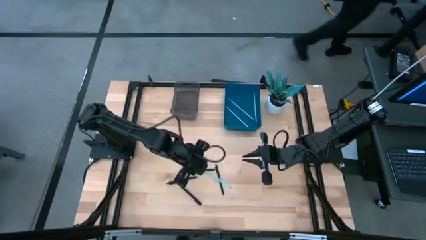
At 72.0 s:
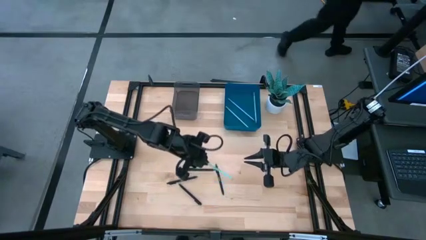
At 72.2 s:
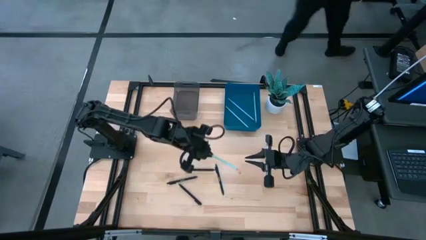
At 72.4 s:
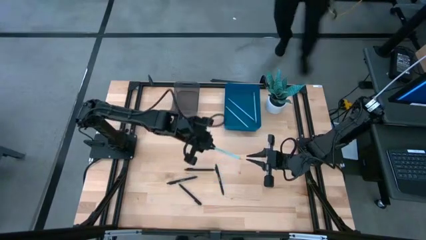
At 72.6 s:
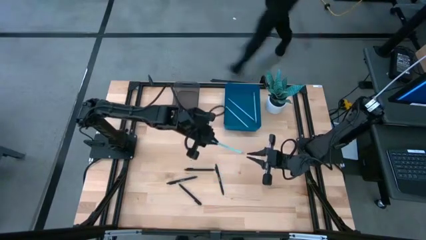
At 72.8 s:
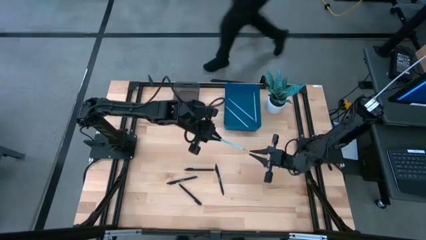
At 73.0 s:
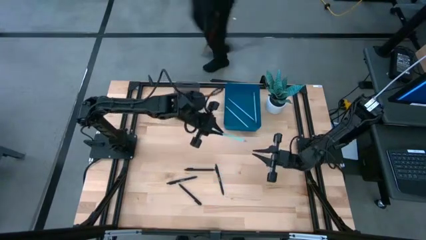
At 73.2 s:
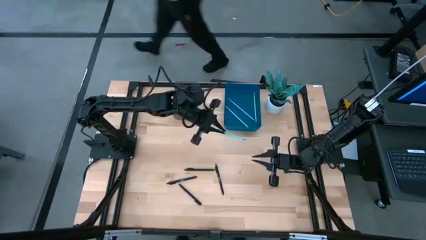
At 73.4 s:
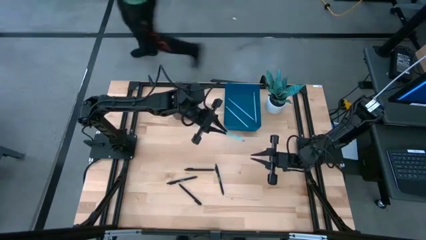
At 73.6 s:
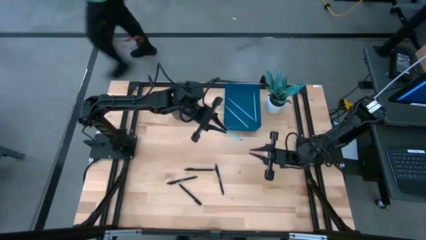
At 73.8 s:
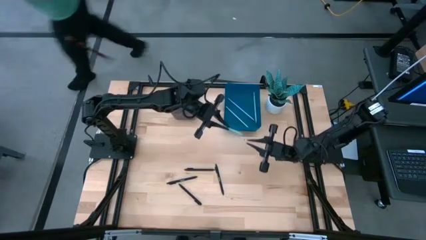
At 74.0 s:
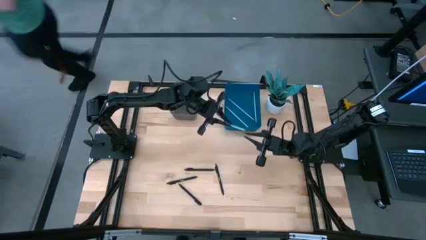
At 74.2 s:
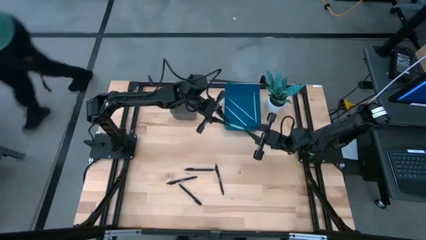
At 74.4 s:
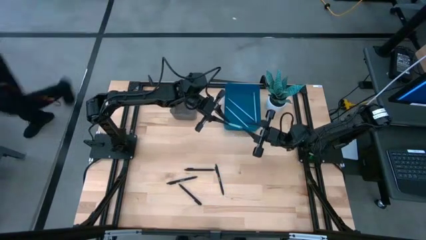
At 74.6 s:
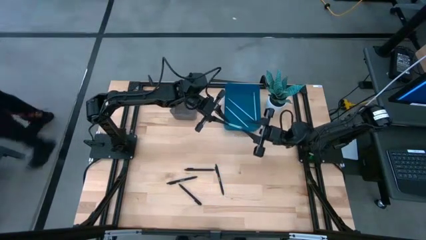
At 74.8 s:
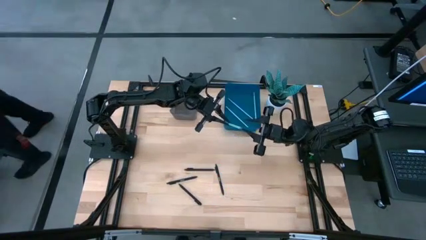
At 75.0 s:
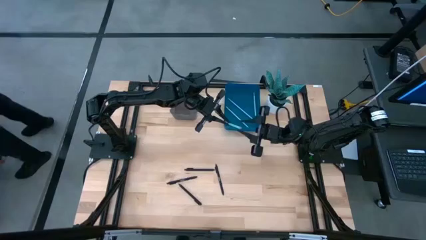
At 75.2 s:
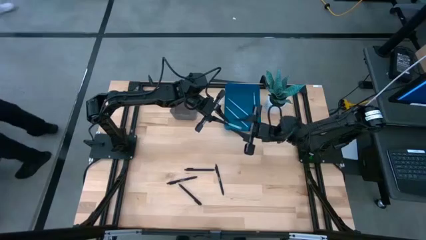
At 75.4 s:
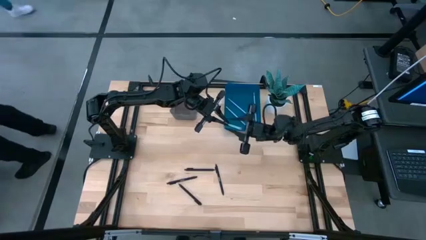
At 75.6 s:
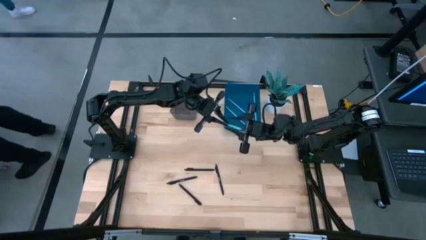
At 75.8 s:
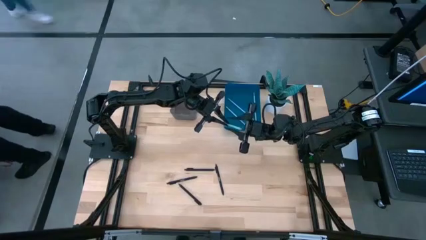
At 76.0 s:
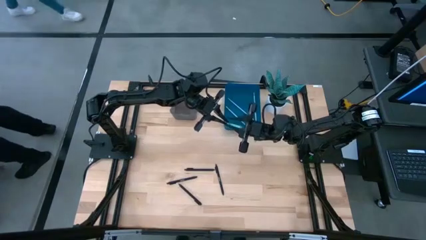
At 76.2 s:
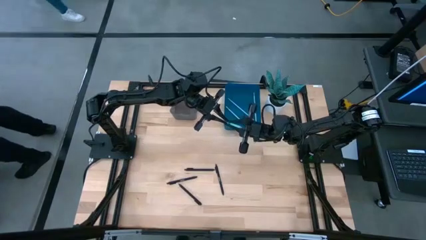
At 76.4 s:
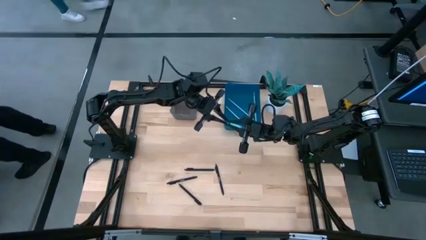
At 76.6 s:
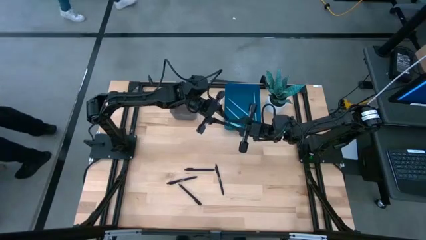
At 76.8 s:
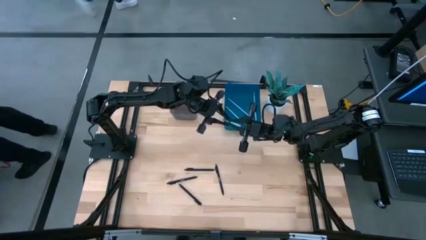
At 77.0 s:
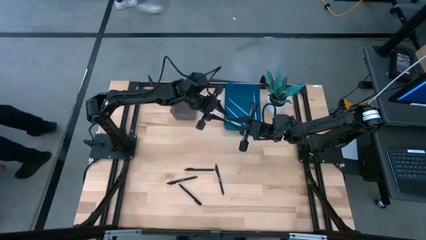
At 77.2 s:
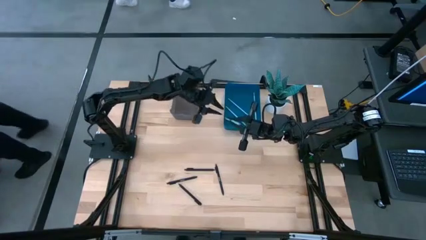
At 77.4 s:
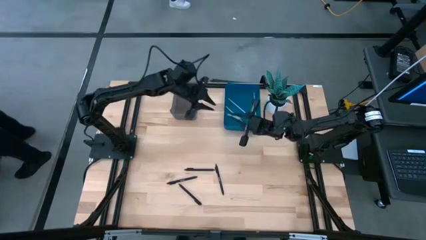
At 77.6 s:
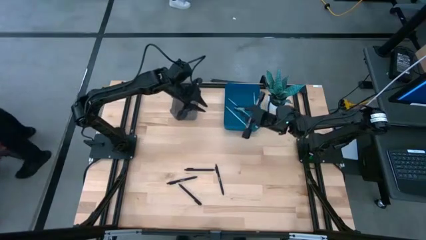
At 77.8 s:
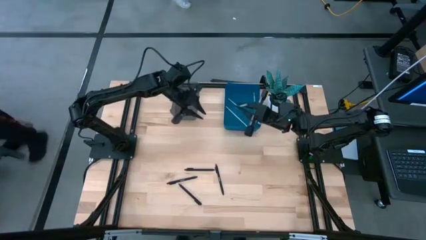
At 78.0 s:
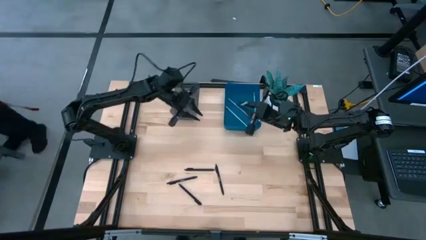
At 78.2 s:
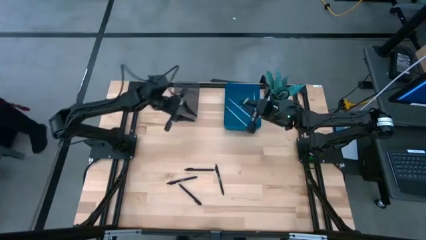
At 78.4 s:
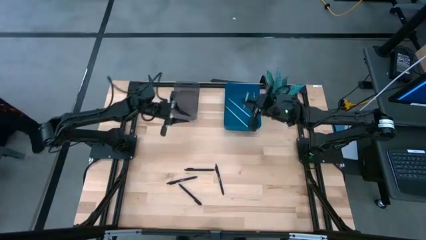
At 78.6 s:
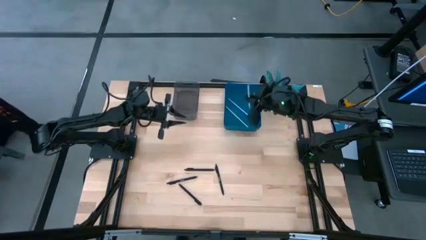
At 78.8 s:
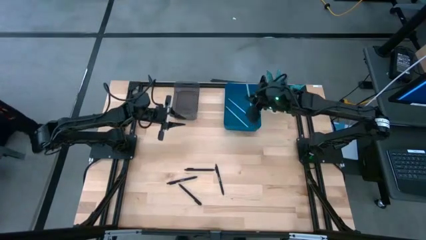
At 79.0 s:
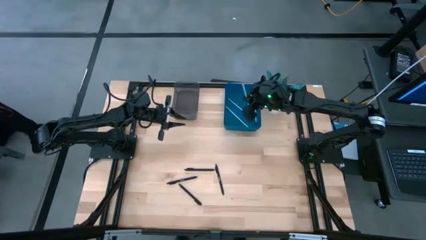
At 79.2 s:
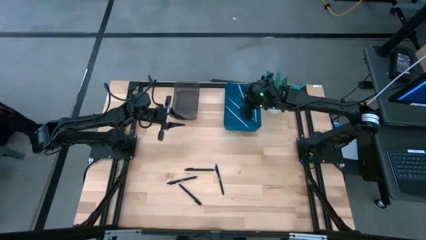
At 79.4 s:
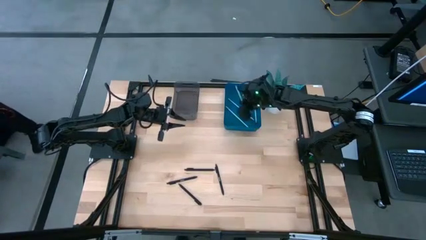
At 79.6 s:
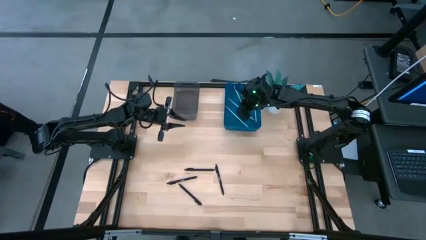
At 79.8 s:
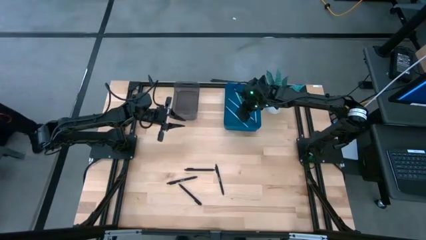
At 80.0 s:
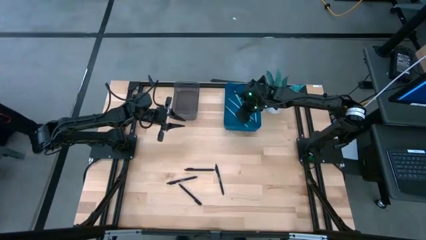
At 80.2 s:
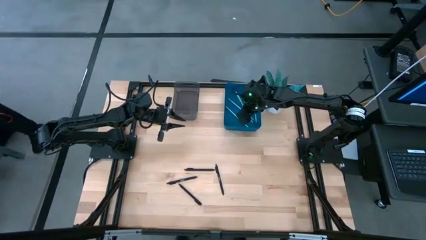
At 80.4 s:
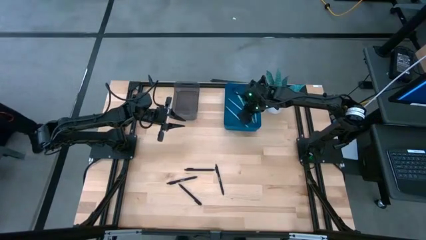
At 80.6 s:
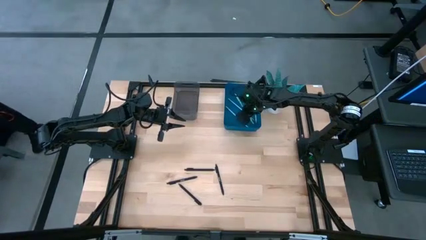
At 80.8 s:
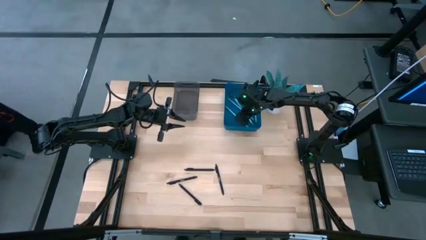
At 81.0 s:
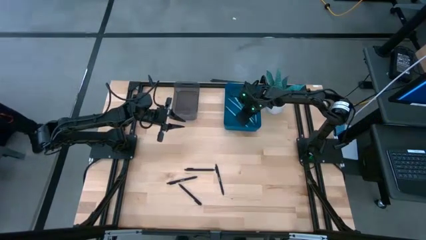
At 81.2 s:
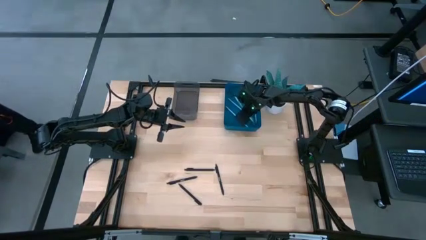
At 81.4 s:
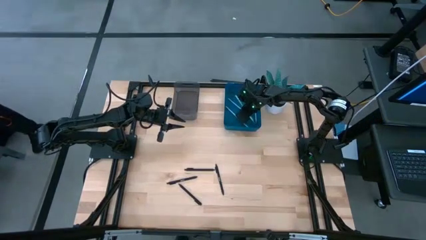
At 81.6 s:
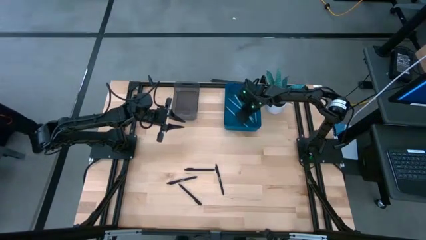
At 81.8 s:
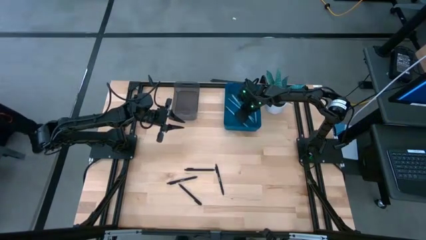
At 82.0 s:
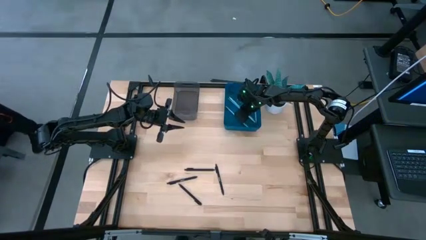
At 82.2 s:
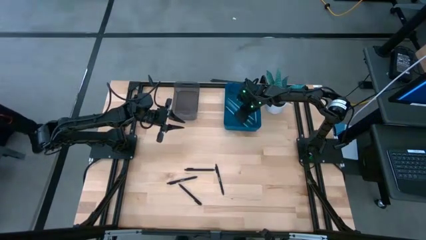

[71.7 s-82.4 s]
Task: Sort pens & pencils
Put the light blue pencil into the blue bin

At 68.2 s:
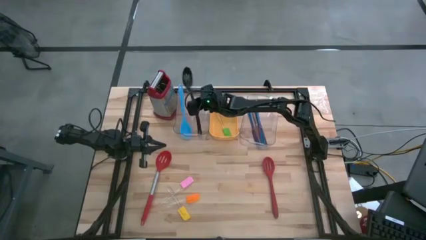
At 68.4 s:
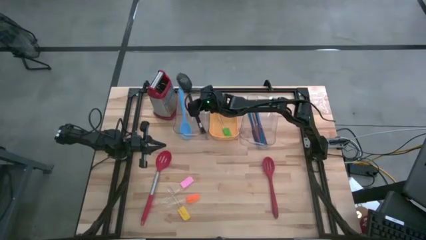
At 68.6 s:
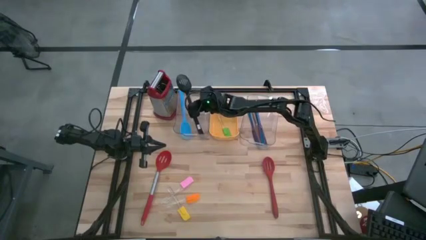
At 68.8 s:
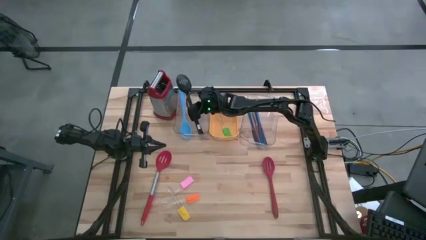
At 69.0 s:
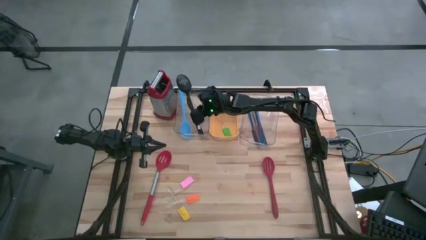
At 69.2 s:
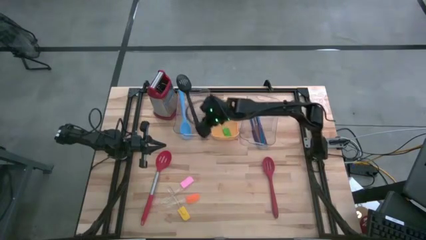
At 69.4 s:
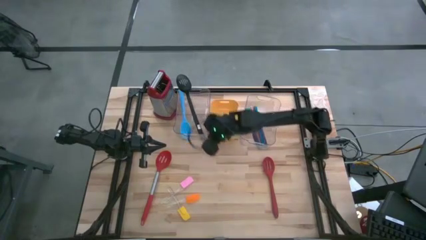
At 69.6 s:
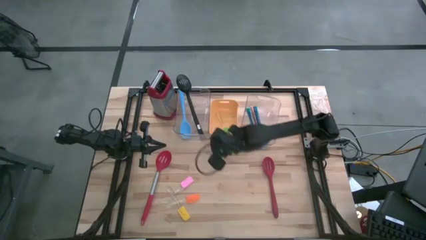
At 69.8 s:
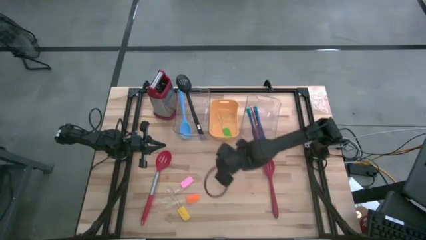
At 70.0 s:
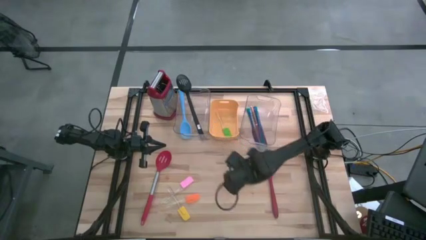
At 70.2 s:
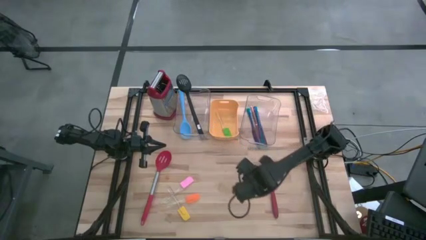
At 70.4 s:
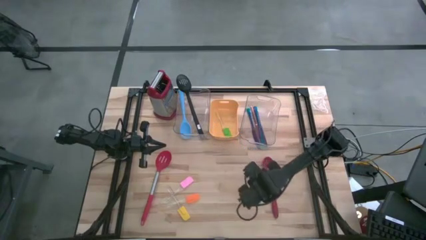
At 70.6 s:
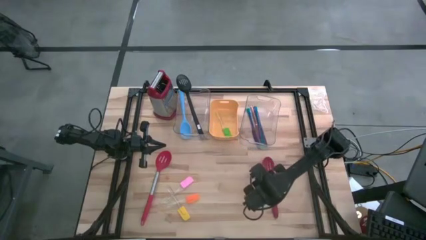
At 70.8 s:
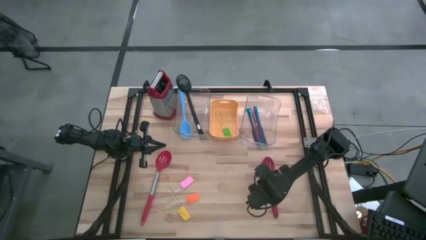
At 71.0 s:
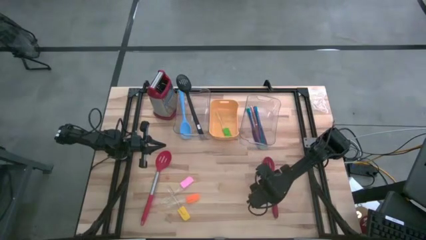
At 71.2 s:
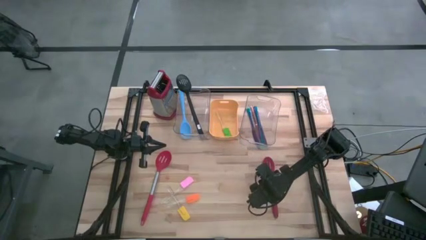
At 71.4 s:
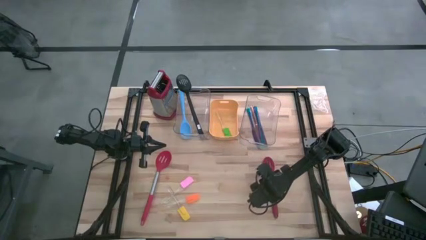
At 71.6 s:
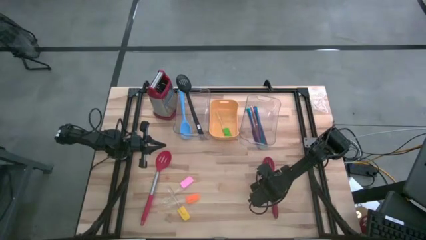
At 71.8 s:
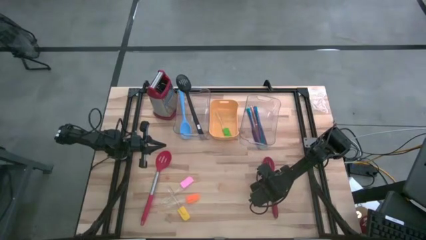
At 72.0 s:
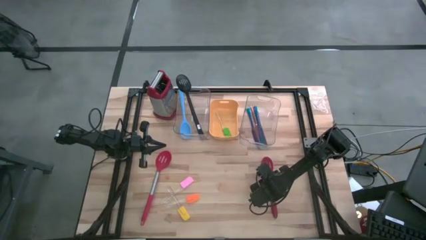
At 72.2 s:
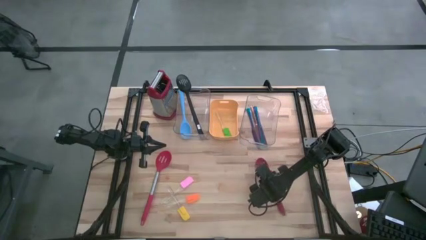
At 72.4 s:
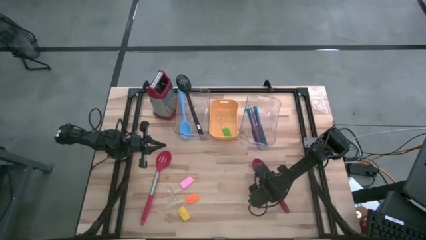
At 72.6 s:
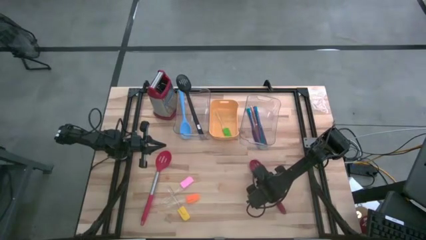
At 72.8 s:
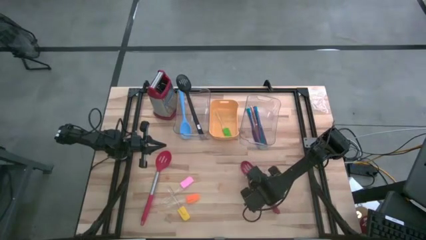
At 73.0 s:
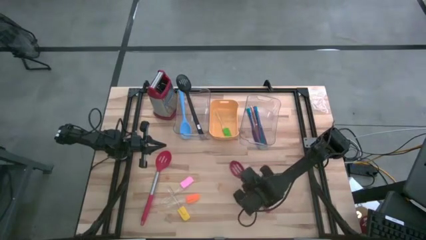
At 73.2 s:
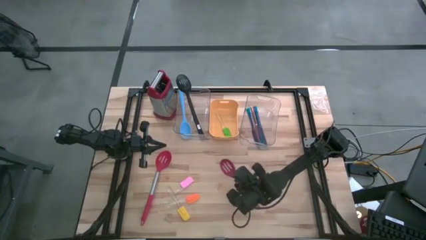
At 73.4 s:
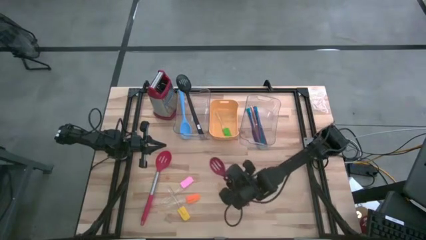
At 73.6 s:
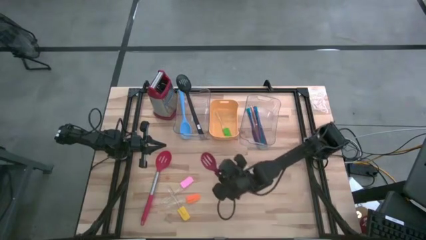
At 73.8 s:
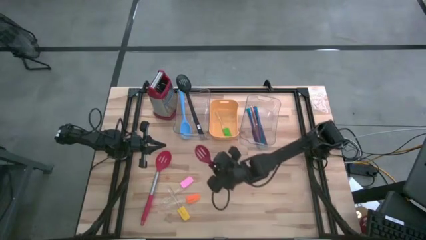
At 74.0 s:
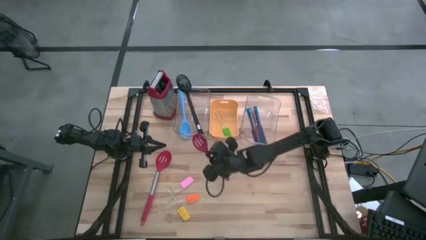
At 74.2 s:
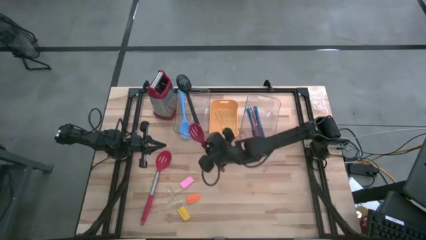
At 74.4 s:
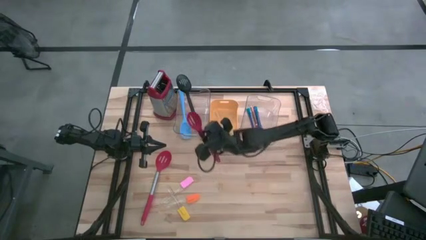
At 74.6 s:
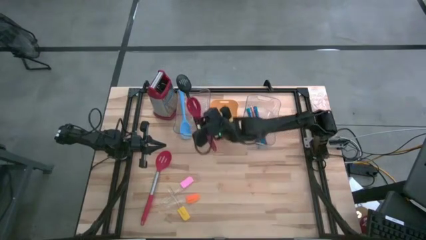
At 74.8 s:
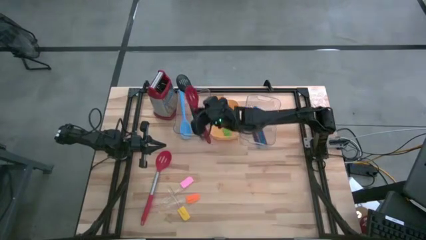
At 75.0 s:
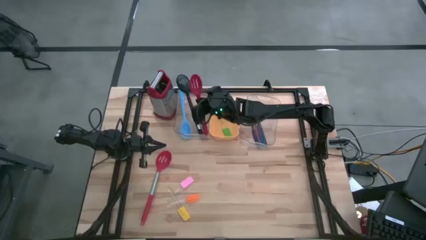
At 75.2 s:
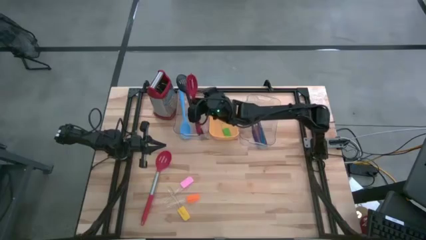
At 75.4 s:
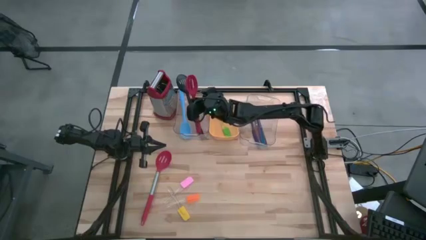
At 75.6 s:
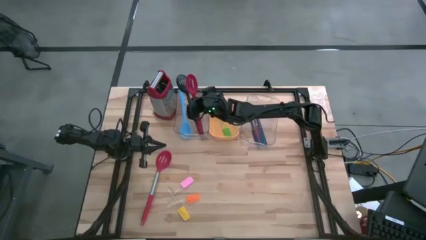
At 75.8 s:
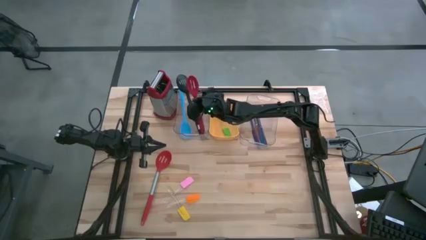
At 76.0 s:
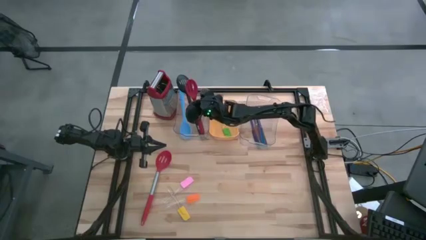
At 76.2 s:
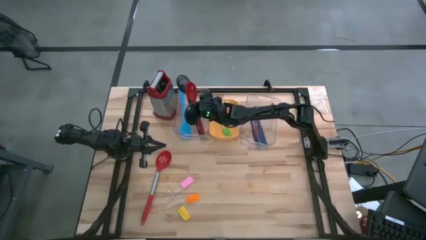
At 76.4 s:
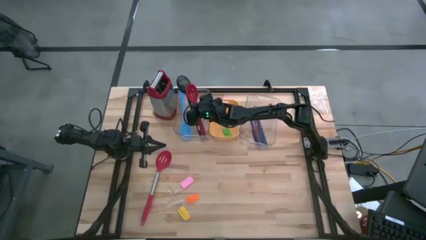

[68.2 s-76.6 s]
Task: Pick & Place Kitchen Items
Put the red spoon into the left transparent bin
